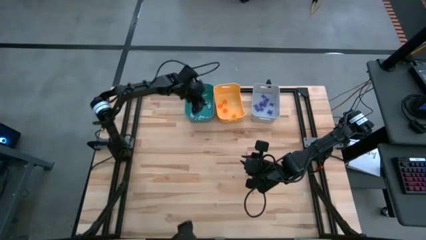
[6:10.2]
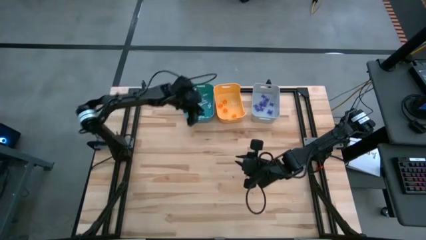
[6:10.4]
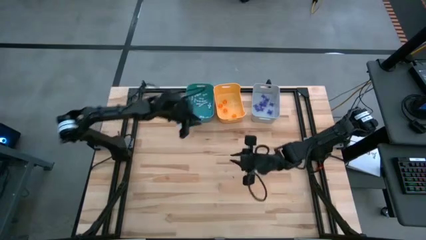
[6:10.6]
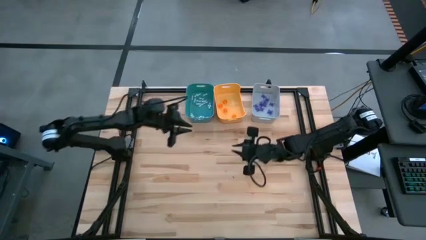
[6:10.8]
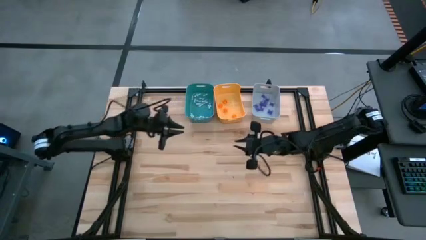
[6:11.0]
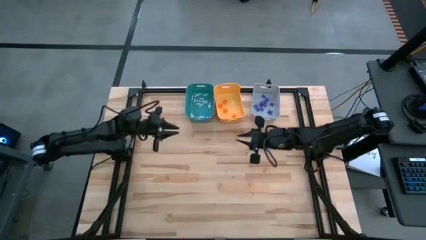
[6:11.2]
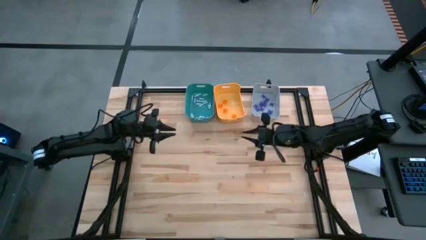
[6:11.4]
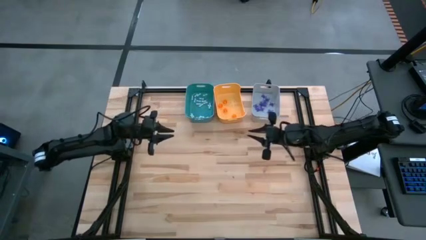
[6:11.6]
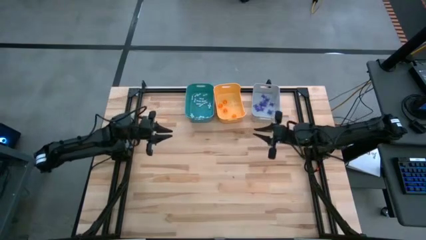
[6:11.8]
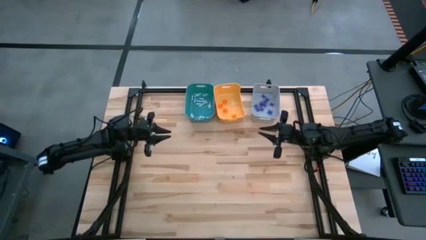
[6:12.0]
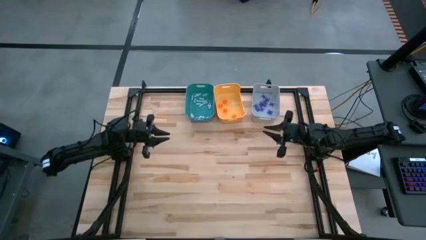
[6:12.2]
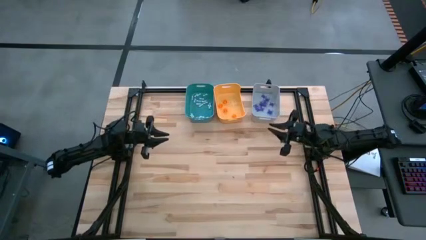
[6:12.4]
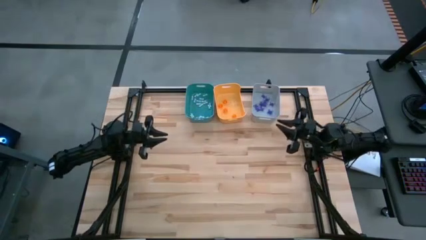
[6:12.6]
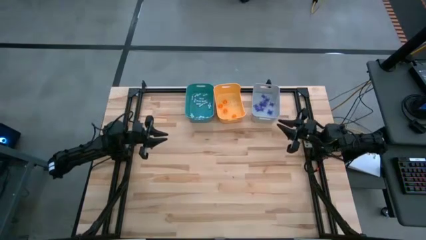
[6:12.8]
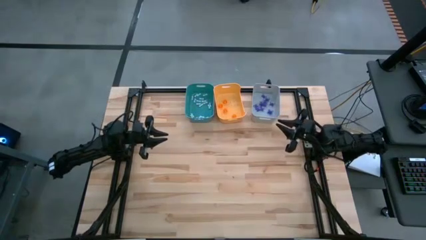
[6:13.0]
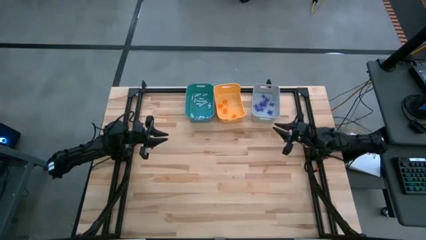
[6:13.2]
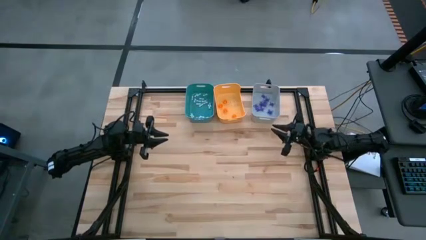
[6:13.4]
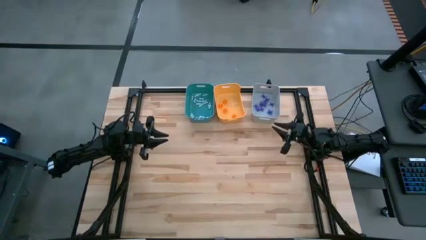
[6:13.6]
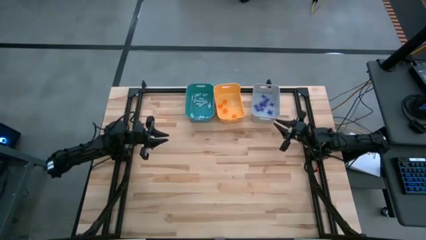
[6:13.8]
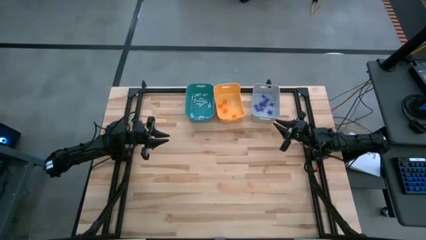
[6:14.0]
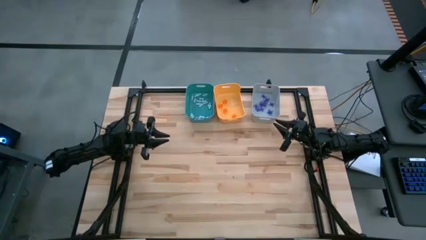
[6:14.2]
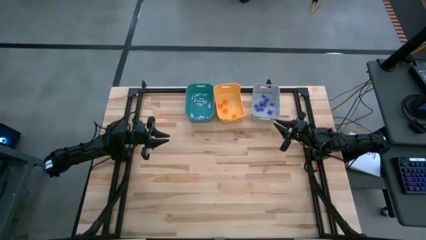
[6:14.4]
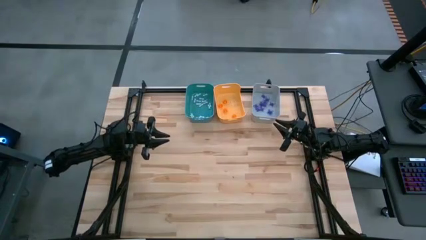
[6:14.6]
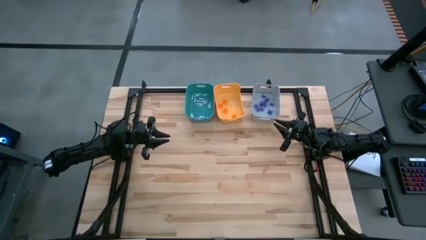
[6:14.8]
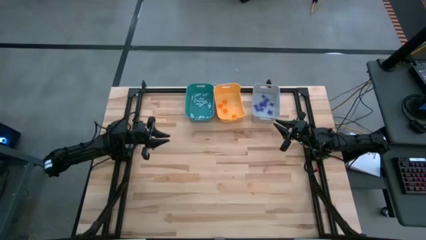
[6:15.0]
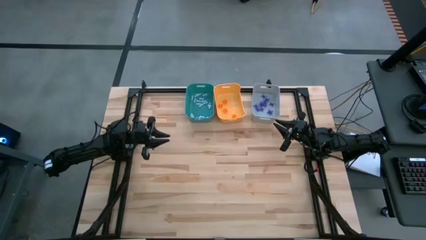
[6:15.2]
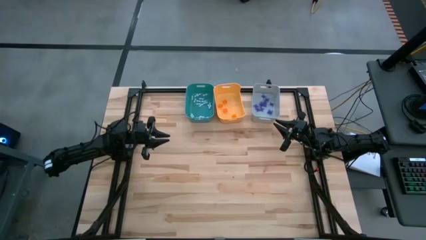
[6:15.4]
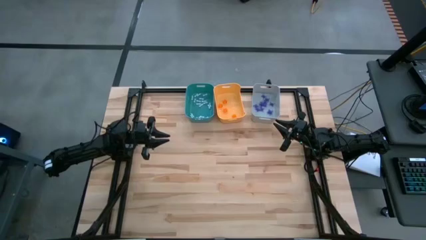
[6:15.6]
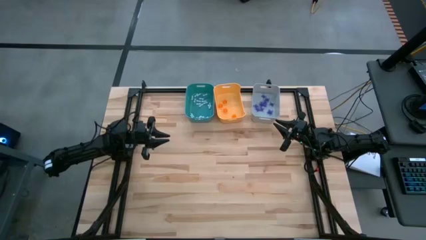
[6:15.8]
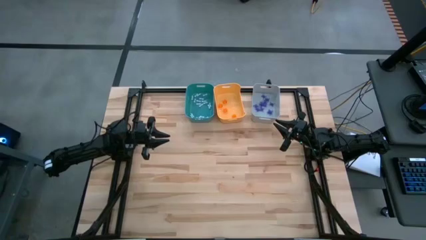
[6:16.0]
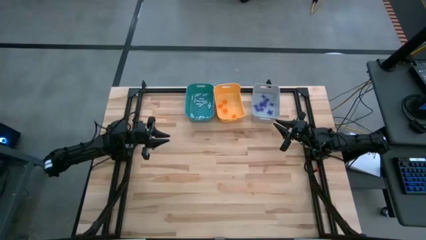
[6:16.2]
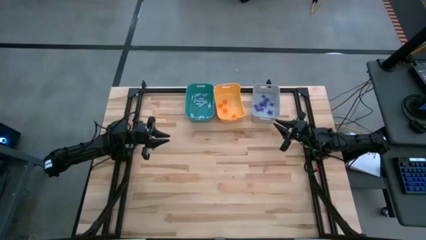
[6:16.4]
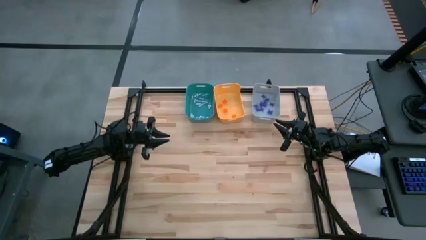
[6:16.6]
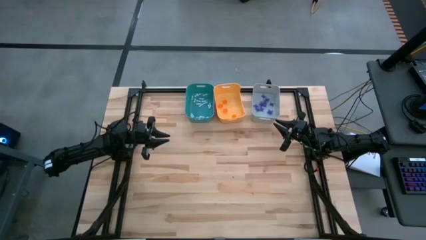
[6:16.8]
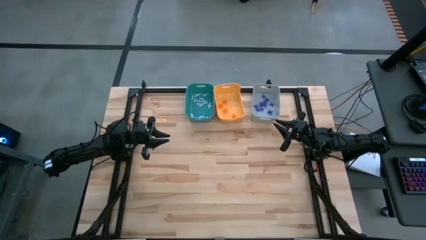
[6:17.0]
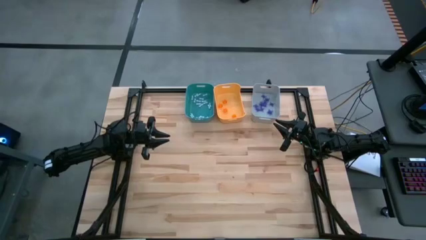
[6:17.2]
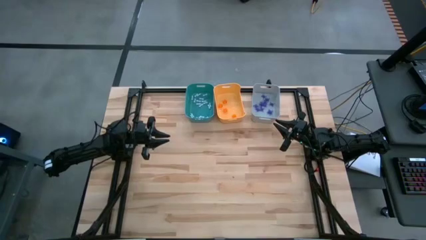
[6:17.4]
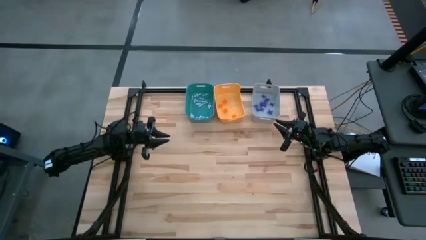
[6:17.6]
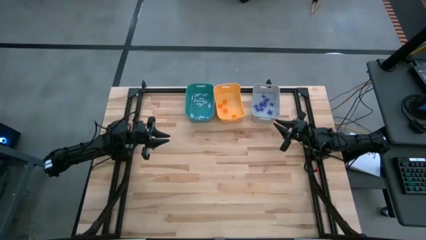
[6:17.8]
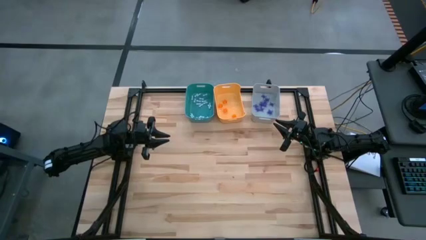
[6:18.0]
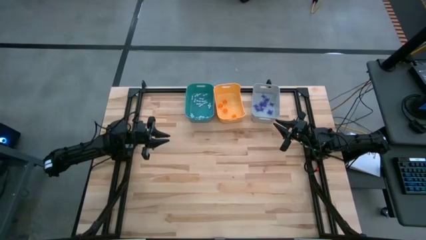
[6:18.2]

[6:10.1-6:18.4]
Task: Sort Halloween decoration
Return to Home Position

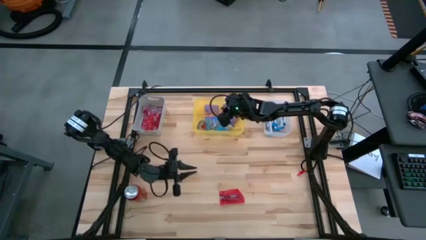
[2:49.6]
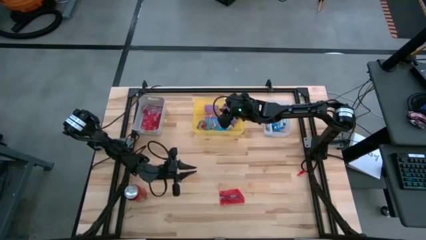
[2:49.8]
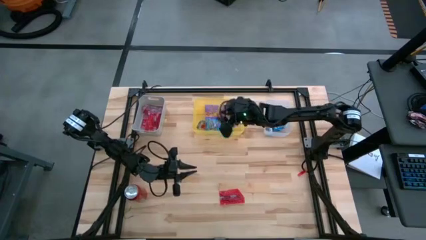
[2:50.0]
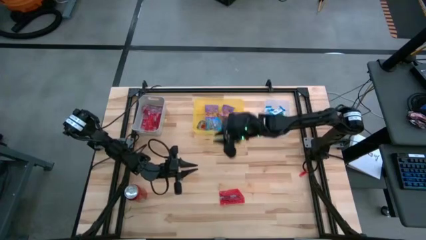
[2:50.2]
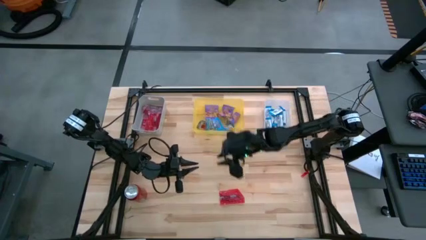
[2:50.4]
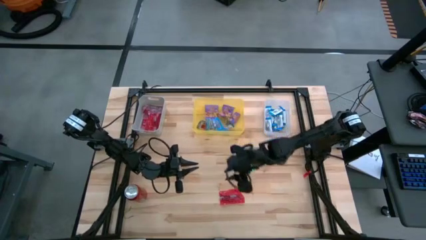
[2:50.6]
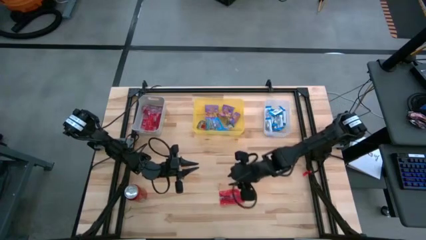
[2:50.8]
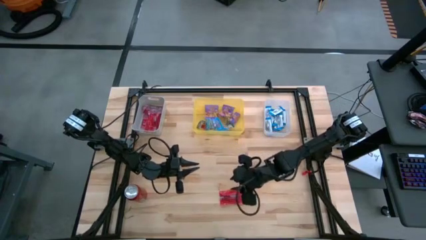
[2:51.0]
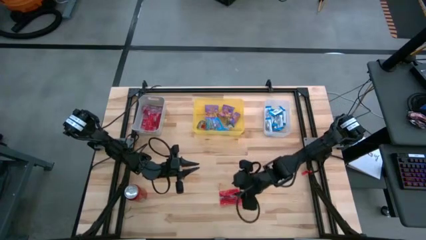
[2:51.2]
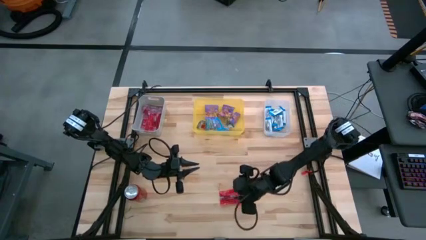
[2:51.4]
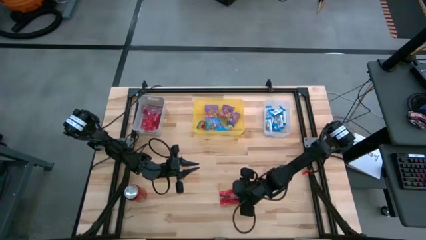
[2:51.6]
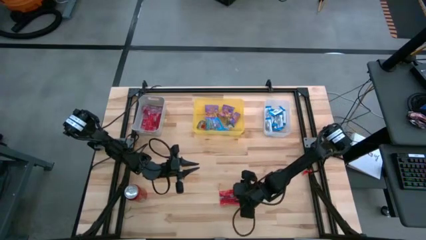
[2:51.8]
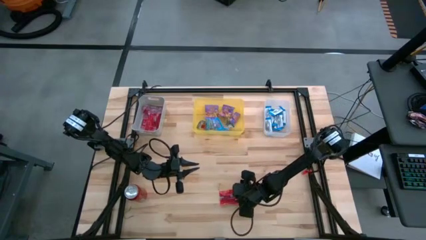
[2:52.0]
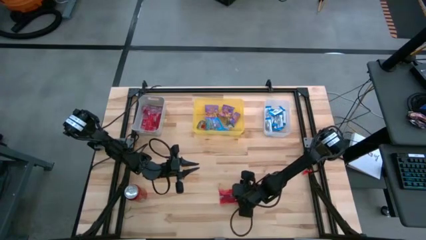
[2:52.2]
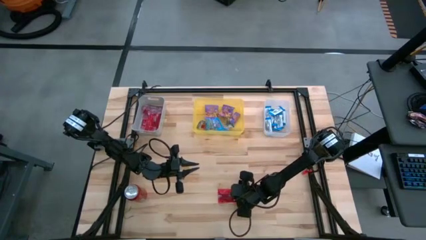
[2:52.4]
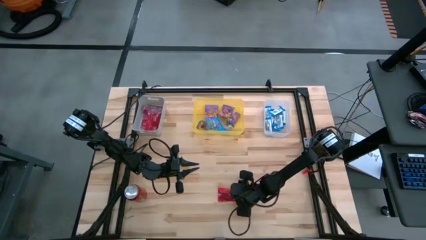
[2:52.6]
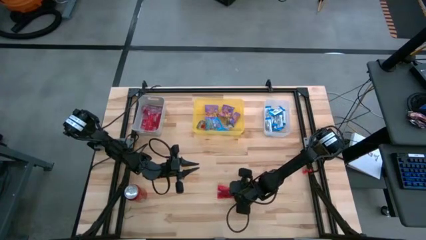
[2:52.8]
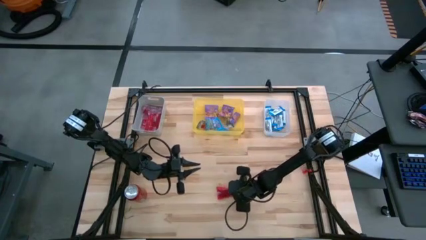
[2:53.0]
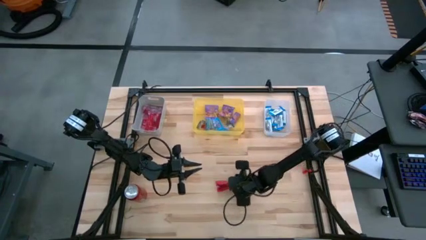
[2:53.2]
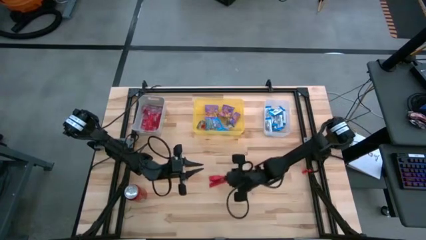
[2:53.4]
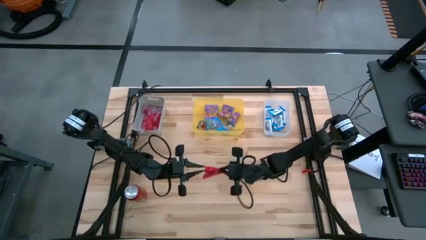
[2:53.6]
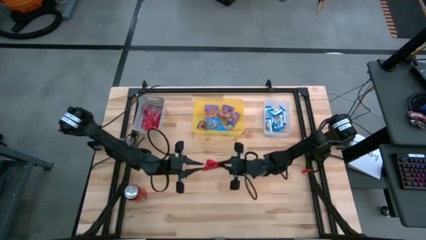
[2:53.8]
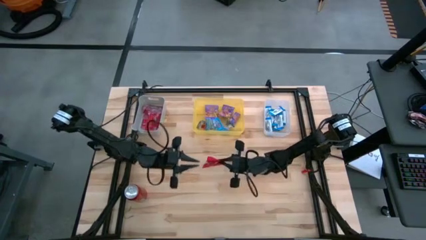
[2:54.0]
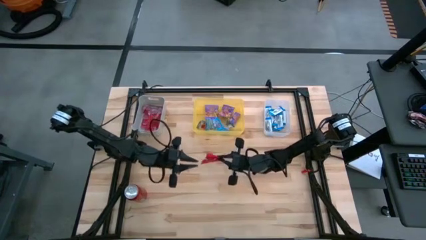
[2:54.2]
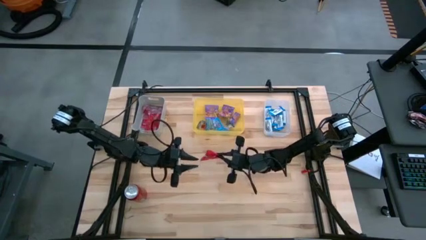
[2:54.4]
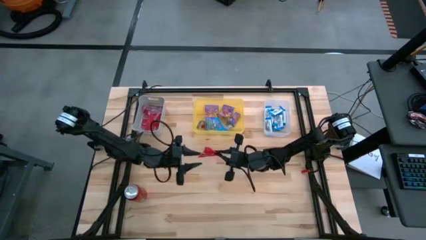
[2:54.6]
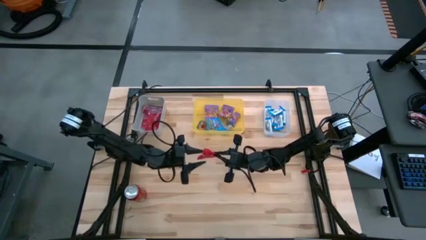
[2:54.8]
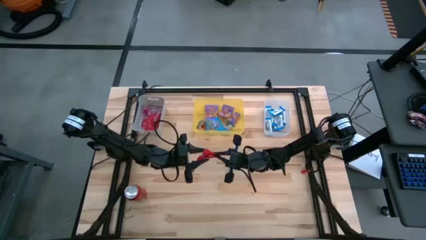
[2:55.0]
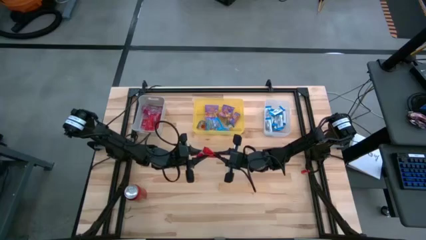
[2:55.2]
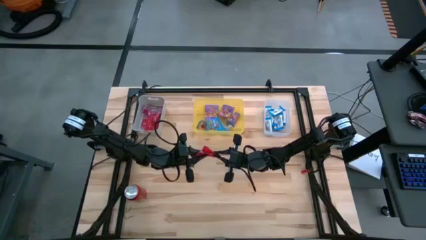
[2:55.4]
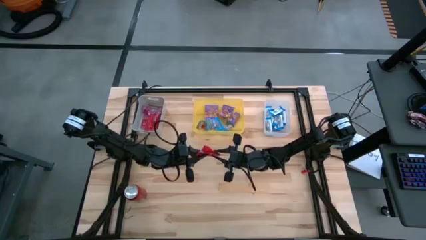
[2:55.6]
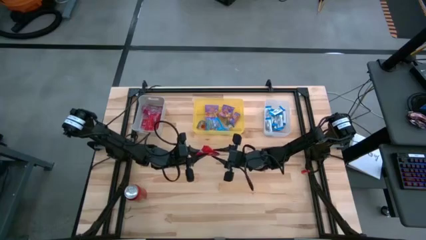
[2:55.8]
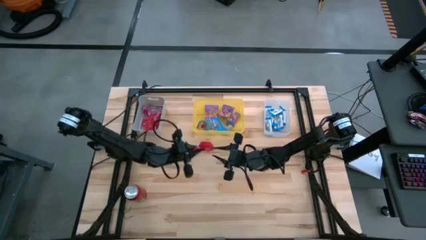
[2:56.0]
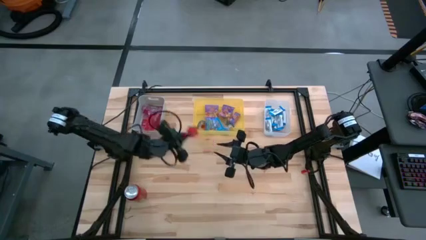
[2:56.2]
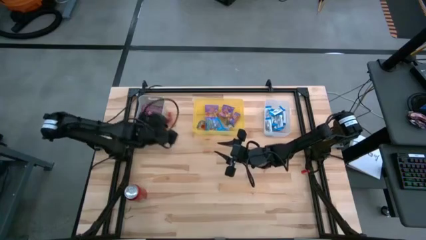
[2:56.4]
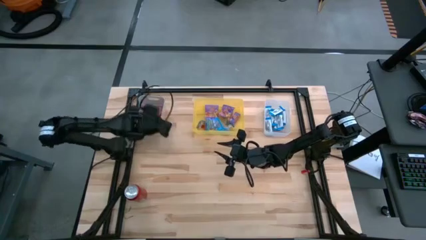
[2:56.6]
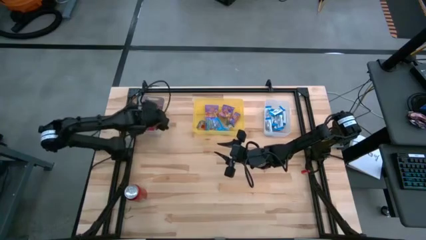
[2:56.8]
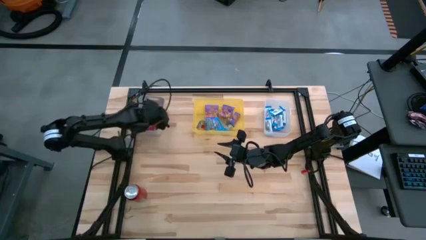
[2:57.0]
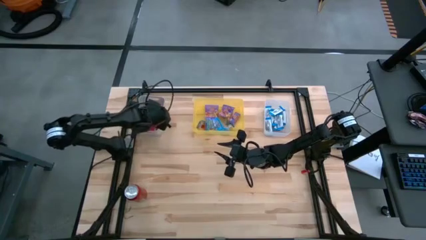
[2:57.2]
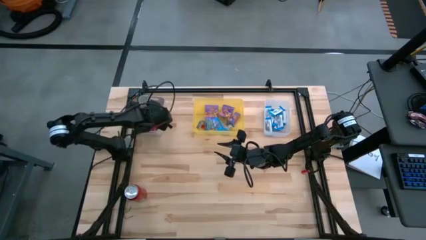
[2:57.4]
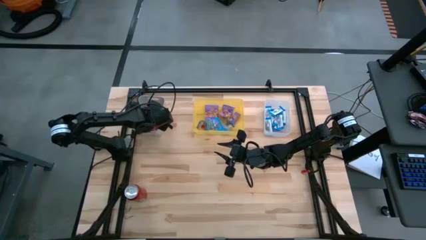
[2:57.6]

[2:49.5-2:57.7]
Task: Sort candy
Put the red gummy into the gray bin
